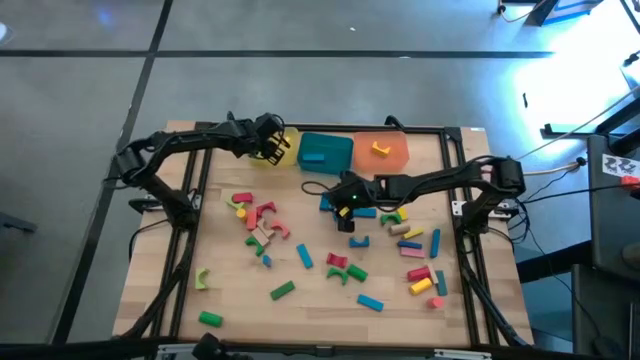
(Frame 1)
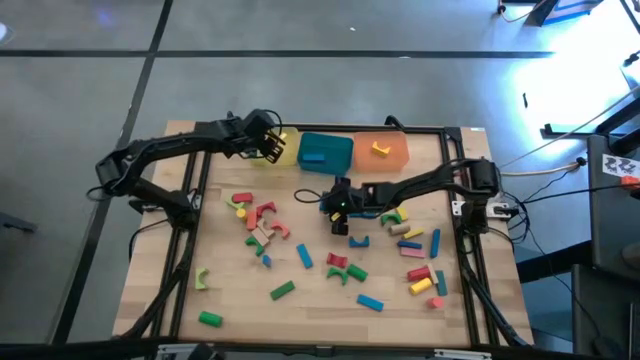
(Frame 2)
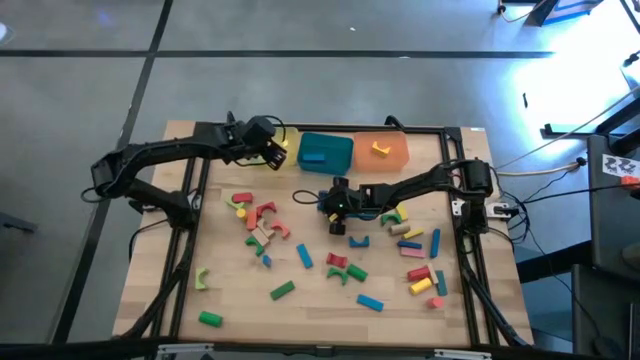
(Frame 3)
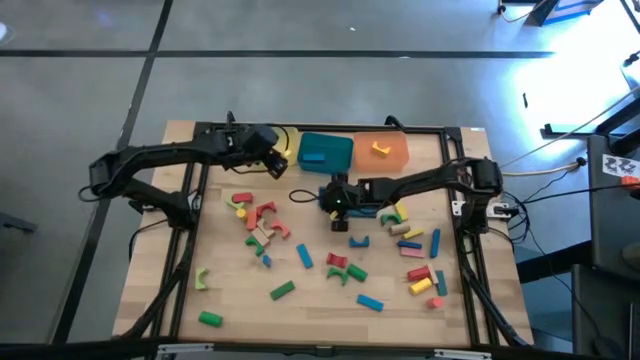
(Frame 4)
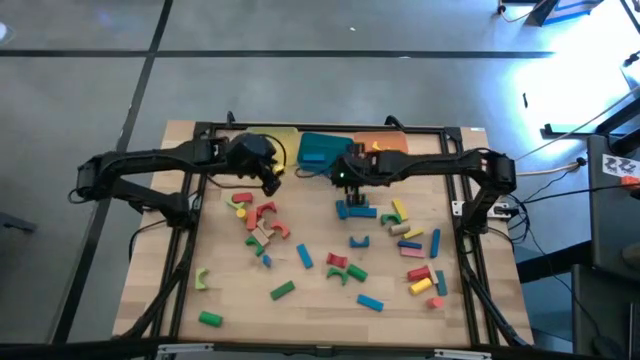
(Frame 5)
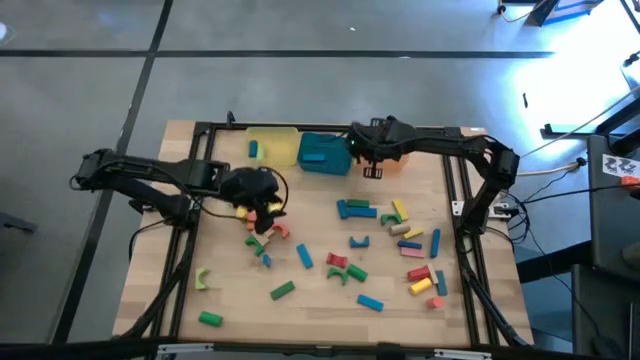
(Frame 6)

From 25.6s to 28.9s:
Task: Sort blocks by size
Put the blue arch block into the orange bin

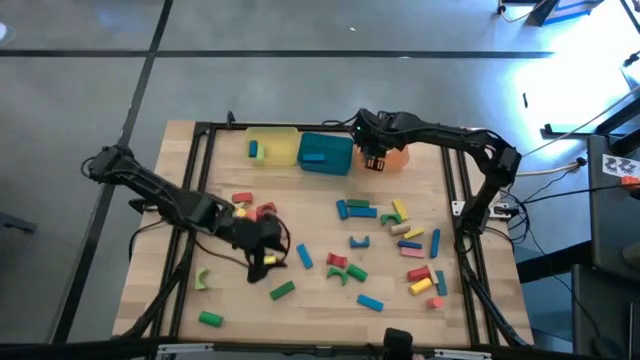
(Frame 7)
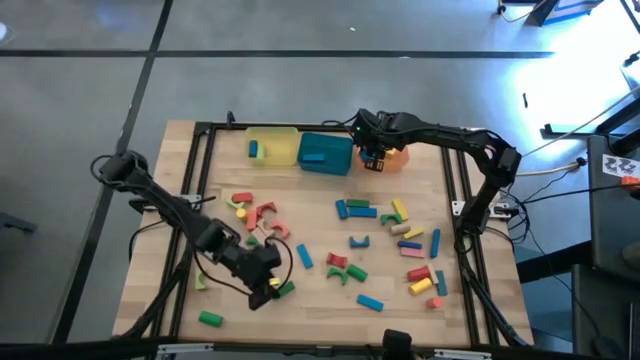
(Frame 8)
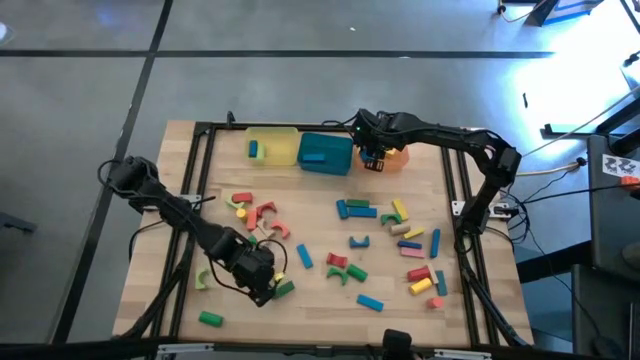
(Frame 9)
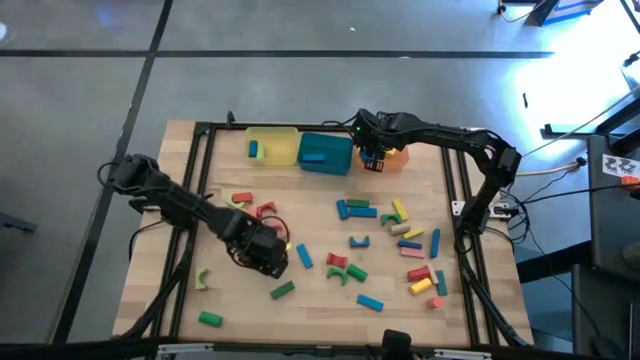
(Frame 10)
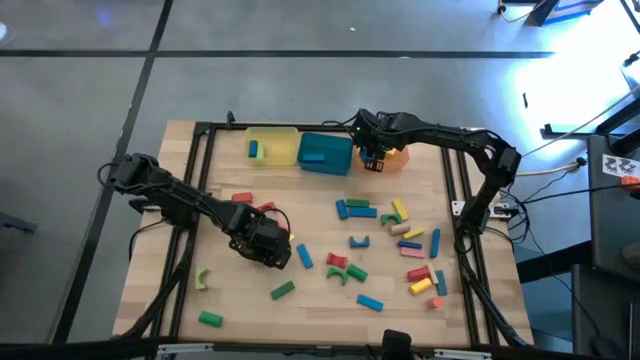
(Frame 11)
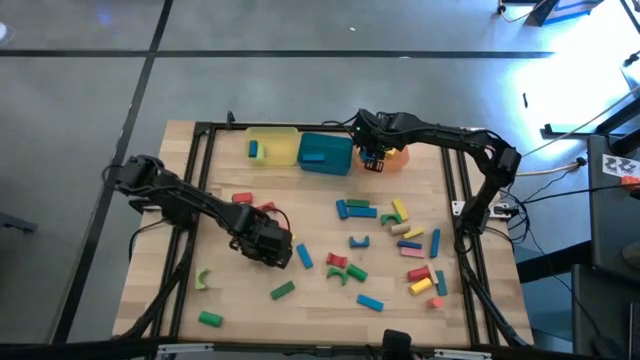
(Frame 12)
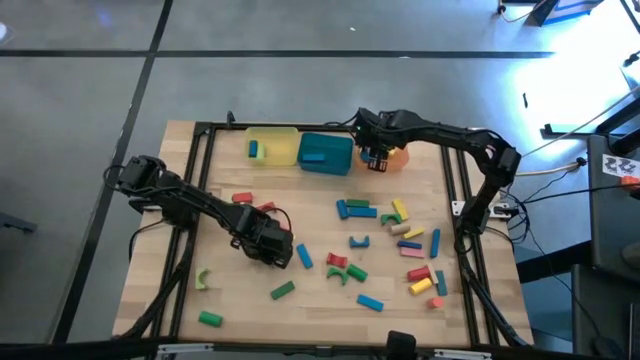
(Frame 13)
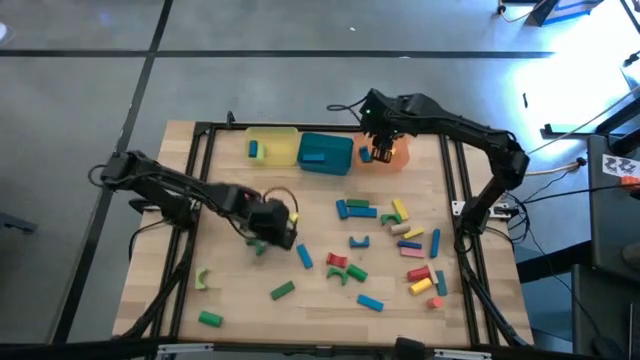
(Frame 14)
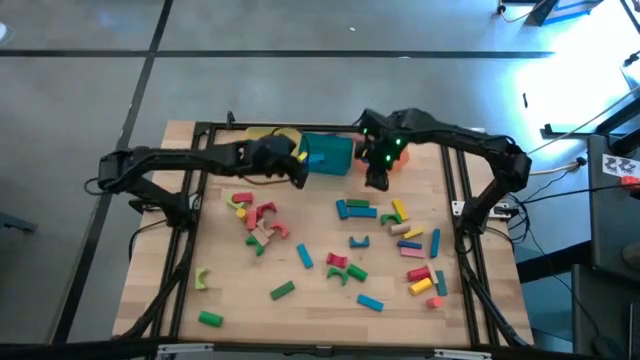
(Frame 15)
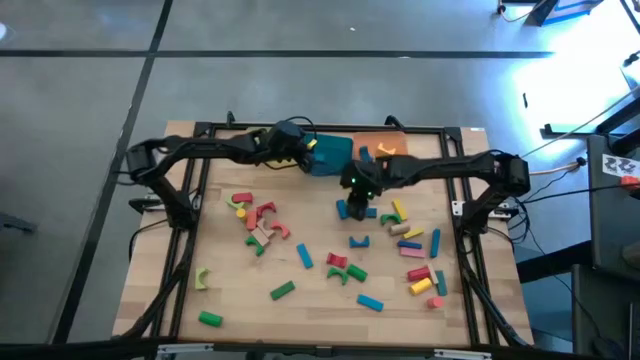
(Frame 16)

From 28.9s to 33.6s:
Put the blue rectangle block into the blue bin

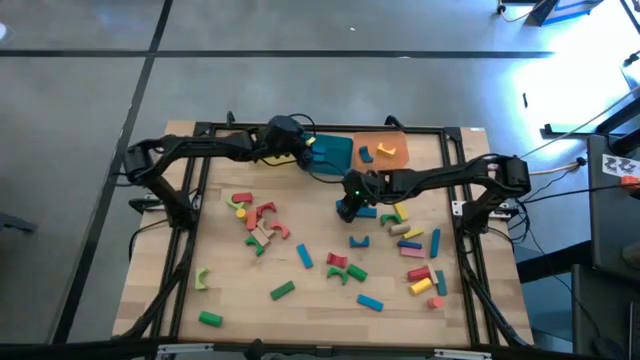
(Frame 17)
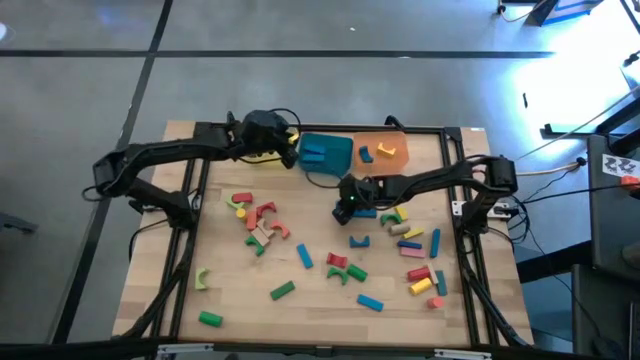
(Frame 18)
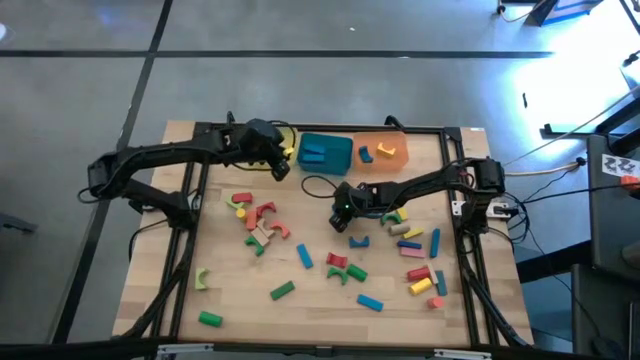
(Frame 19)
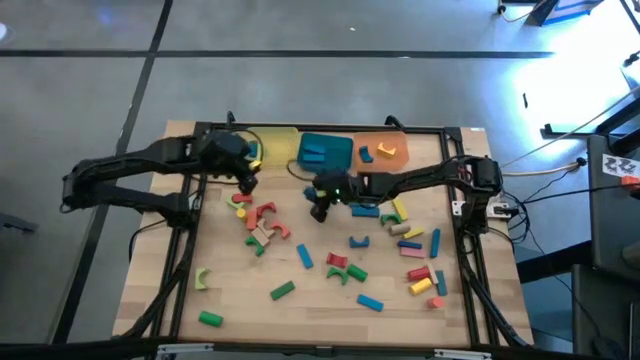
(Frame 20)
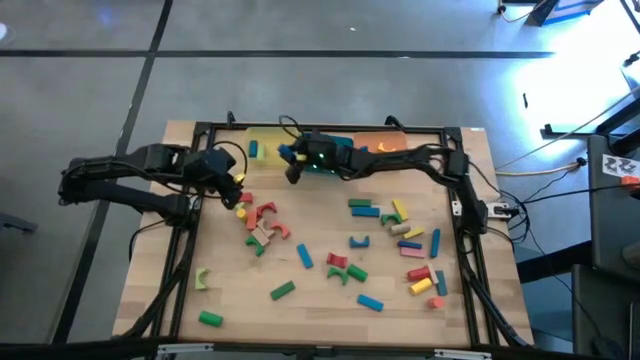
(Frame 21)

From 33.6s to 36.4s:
Put the blue cylindrical block into the yellow bin

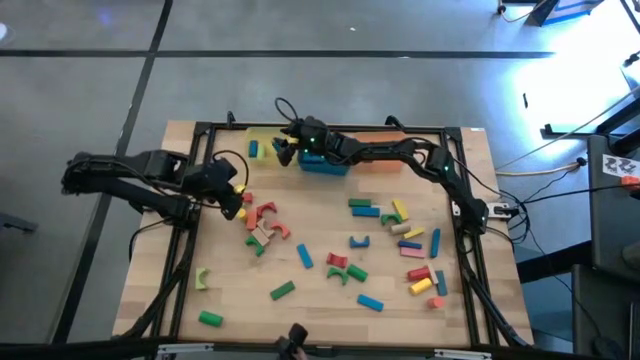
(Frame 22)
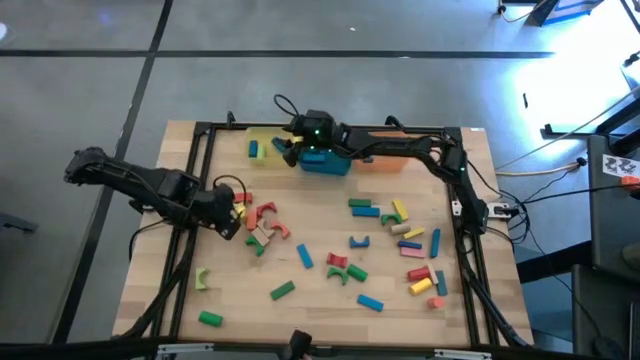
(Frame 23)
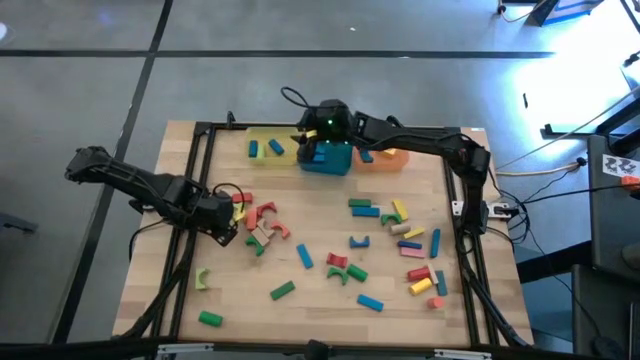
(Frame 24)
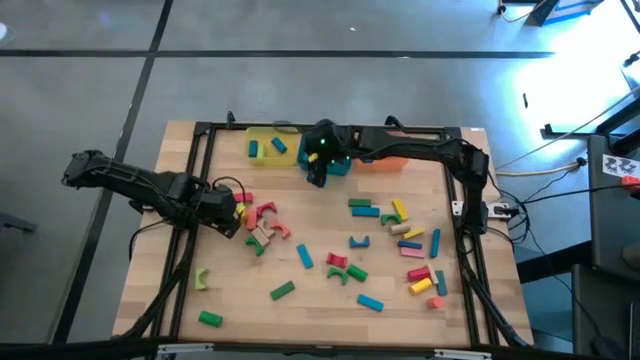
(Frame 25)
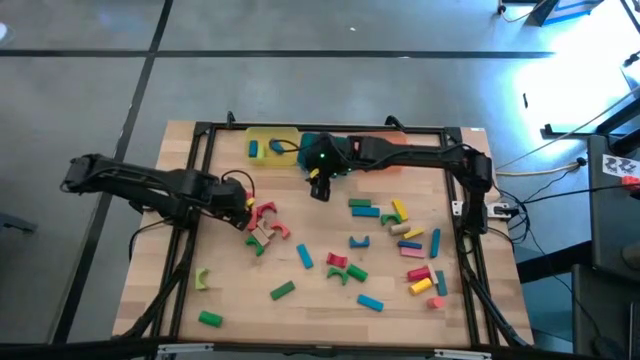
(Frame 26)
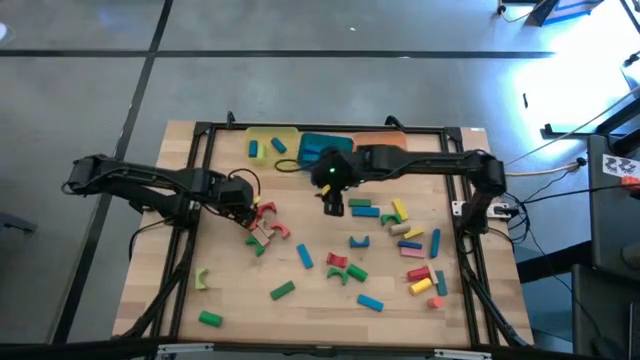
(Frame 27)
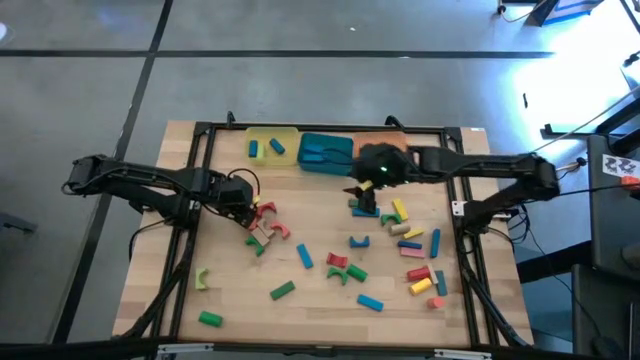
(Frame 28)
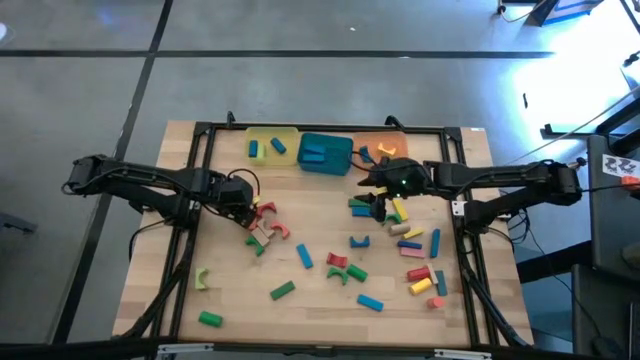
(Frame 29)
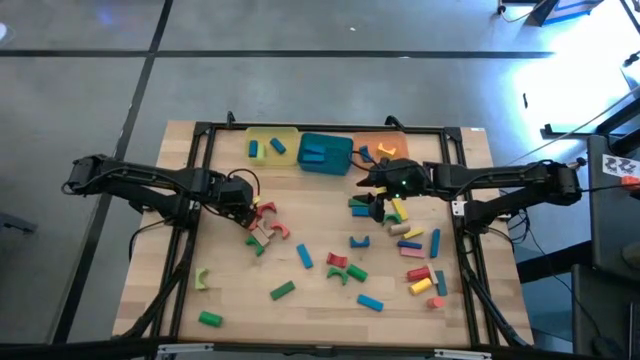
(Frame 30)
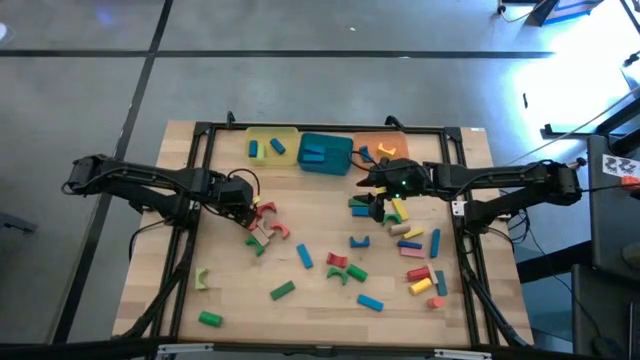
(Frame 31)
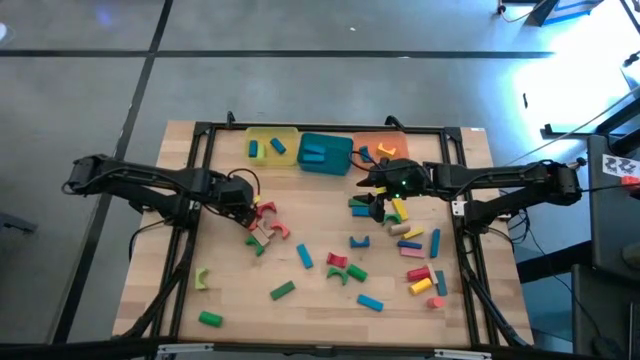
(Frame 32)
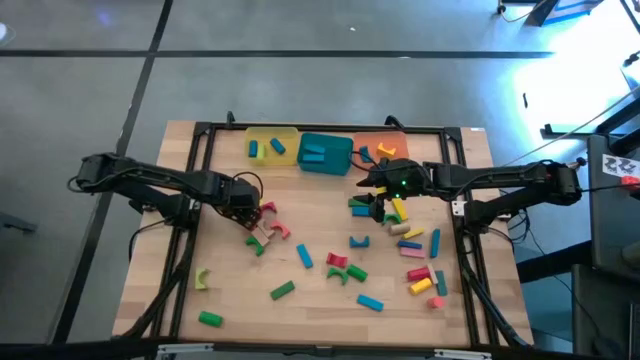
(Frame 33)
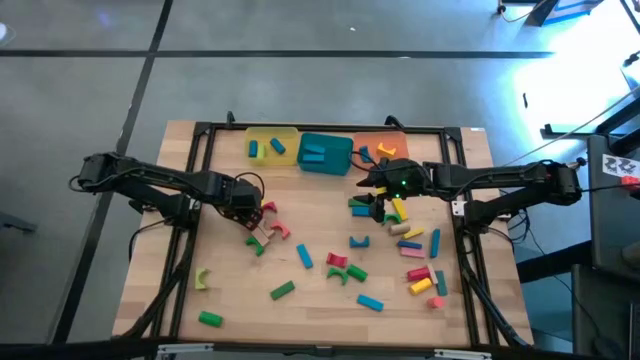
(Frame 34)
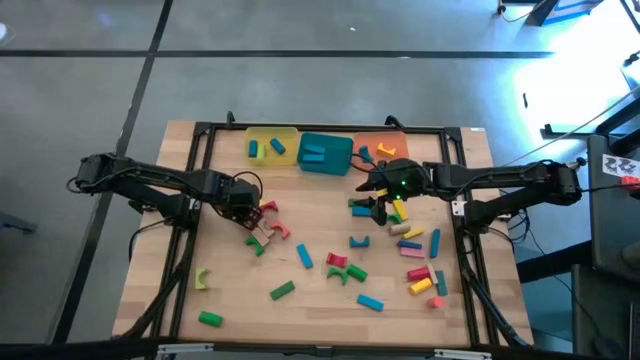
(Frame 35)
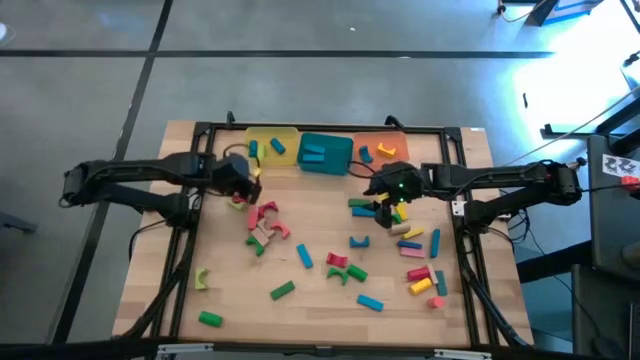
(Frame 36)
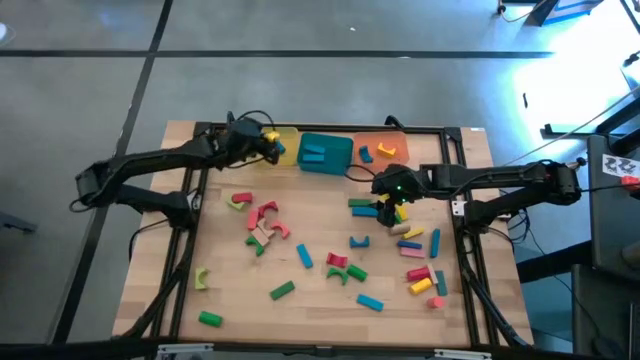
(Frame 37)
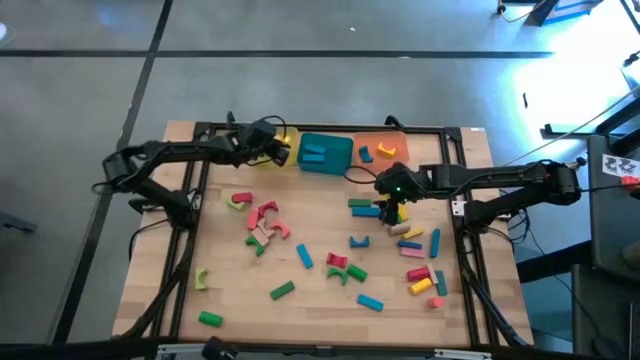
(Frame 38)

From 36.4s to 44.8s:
Put the yellow cylindrical block into the yellow bin

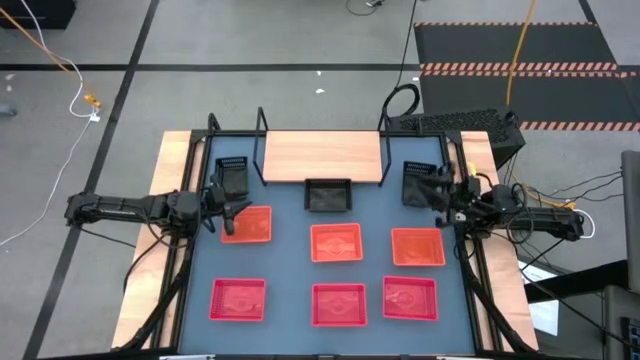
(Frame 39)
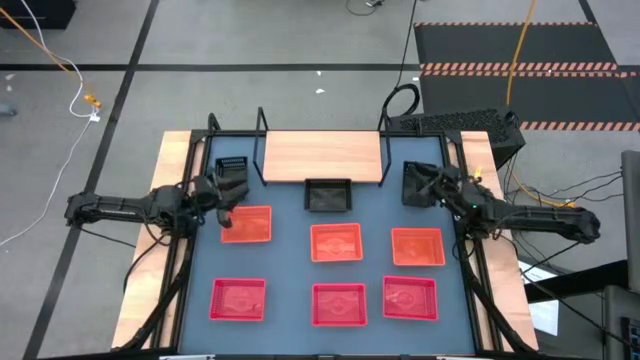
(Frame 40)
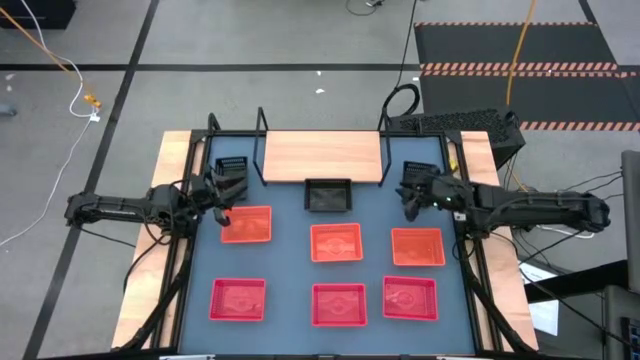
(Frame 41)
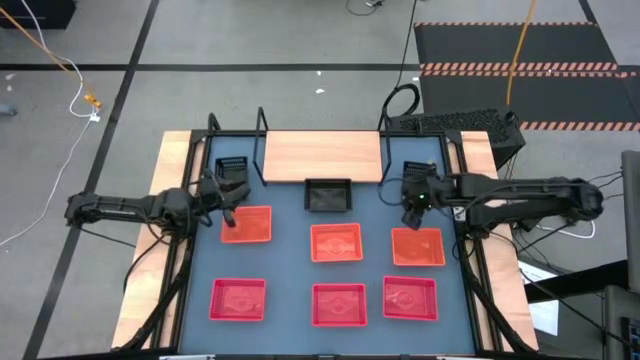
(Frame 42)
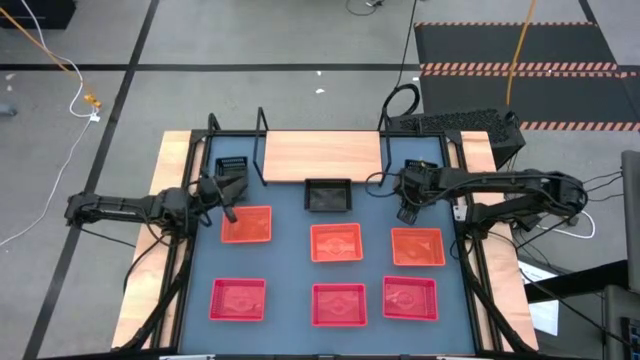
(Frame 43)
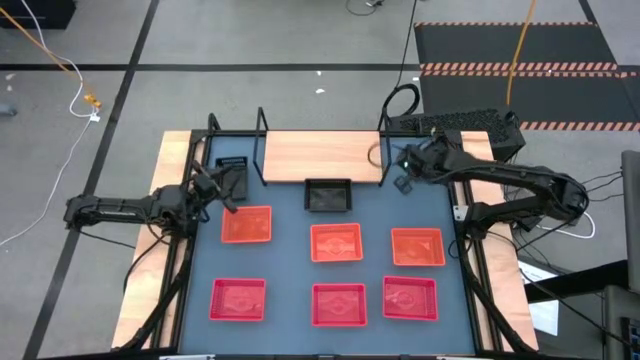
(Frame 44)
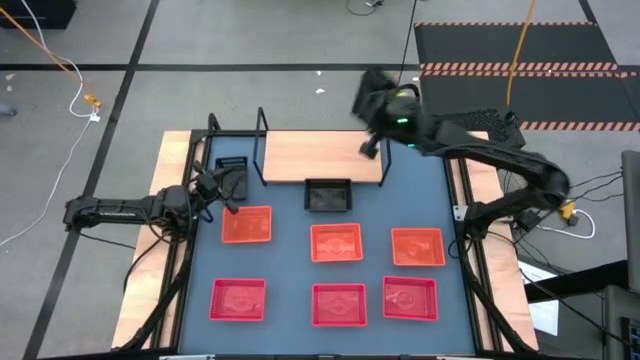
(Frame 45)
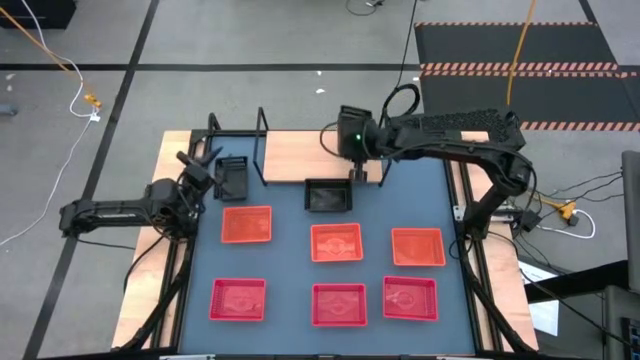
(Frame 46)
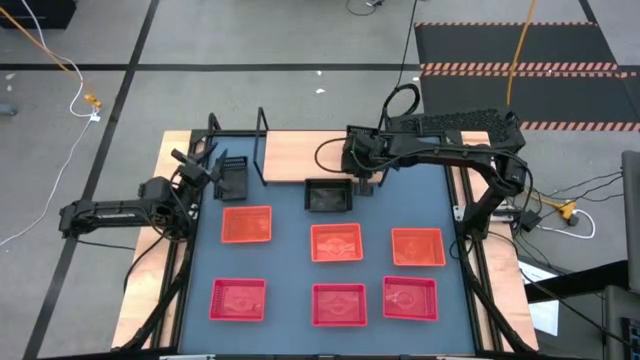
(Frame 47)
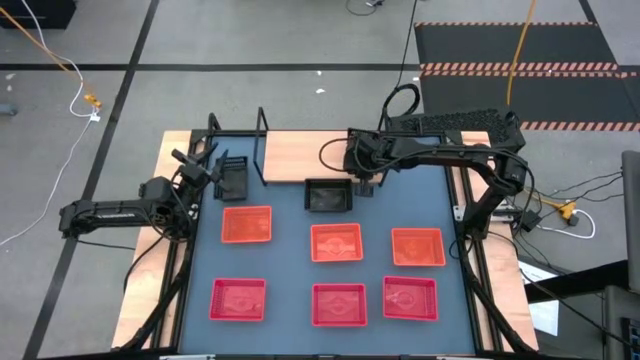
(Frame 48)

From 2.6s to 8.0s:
Task: Stack baskets on shelf by color
Put the right black bin on the shelf
